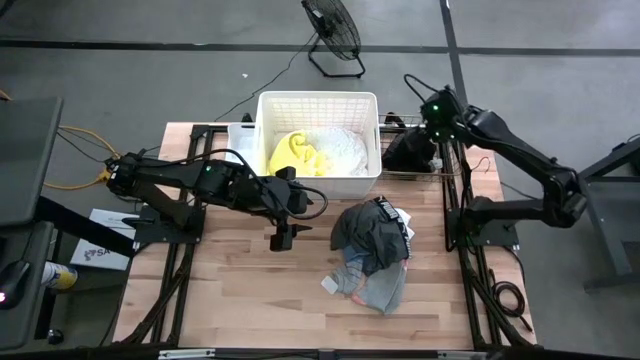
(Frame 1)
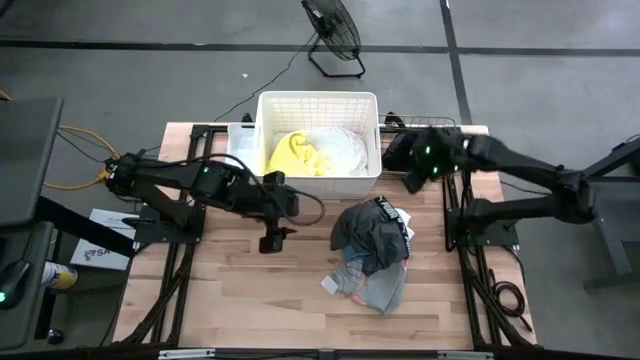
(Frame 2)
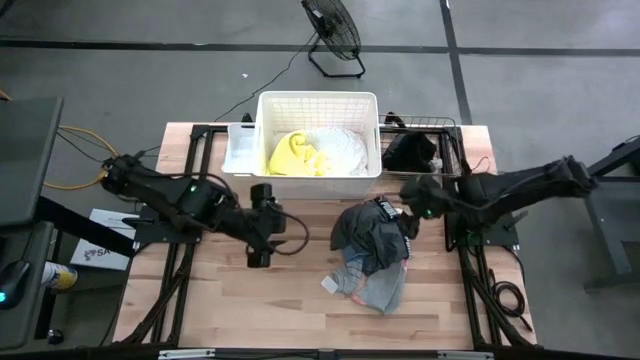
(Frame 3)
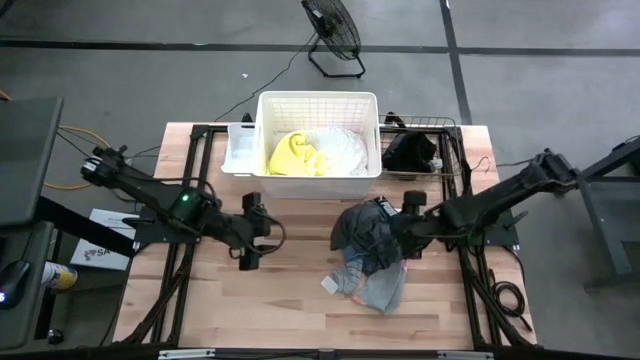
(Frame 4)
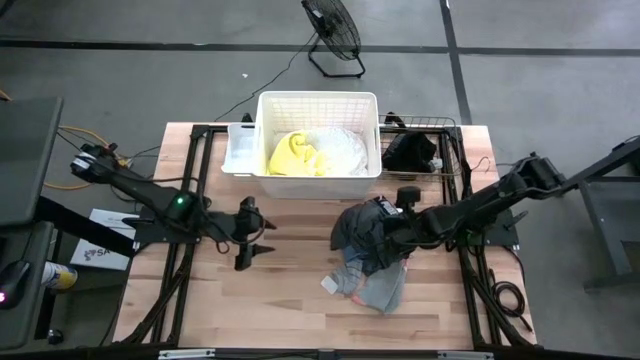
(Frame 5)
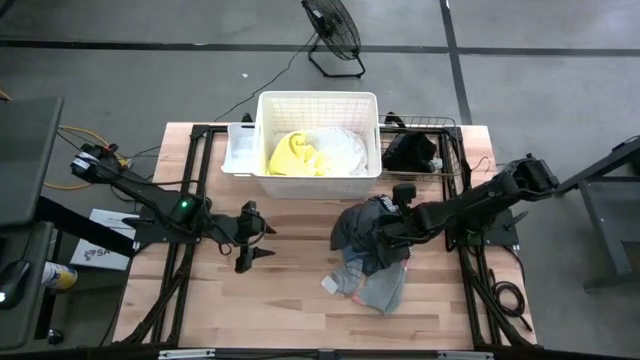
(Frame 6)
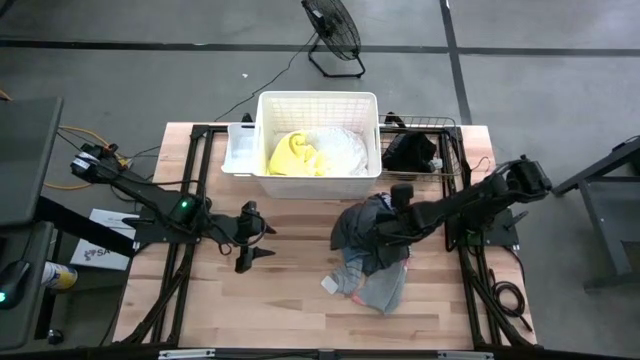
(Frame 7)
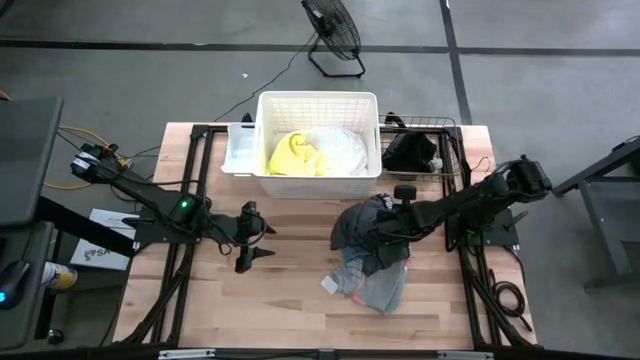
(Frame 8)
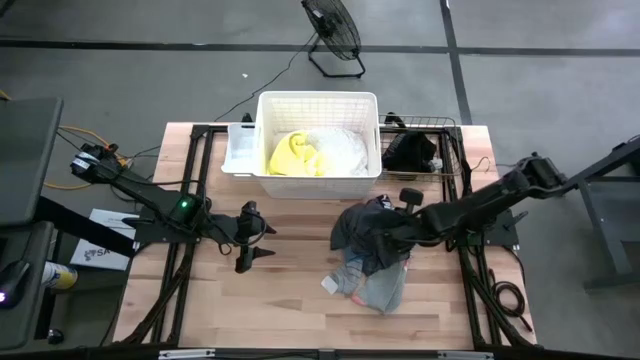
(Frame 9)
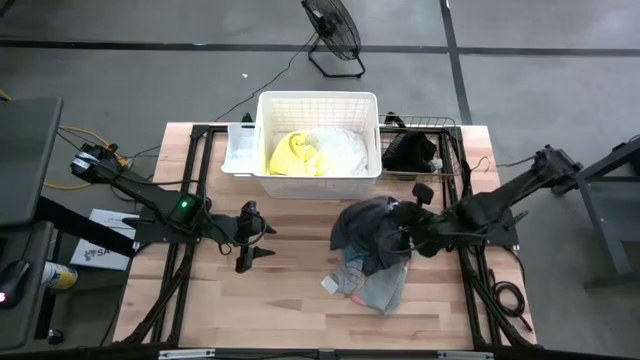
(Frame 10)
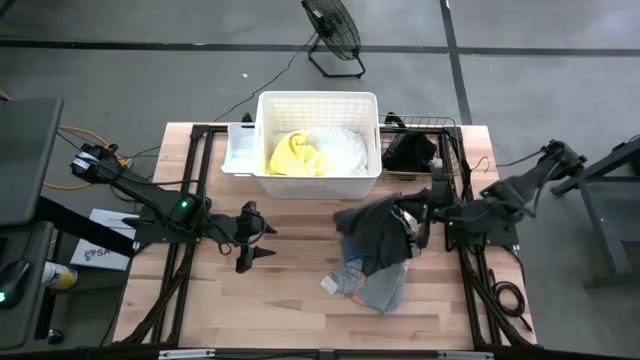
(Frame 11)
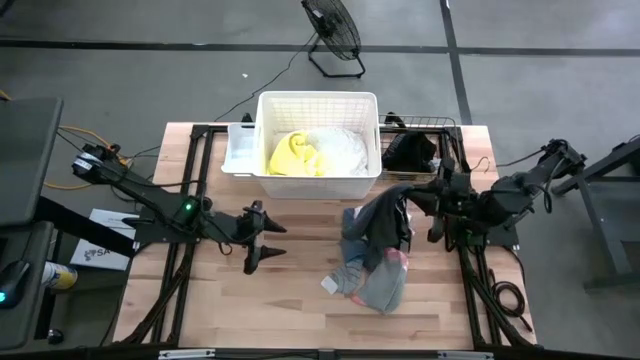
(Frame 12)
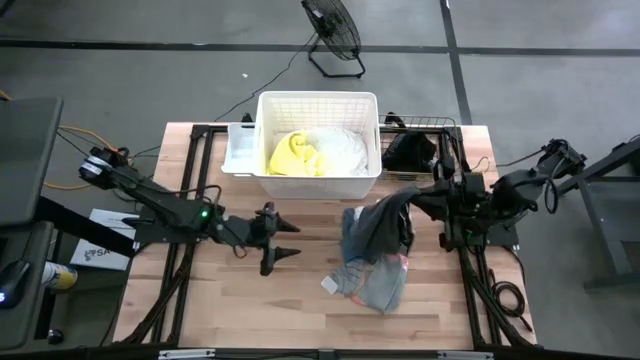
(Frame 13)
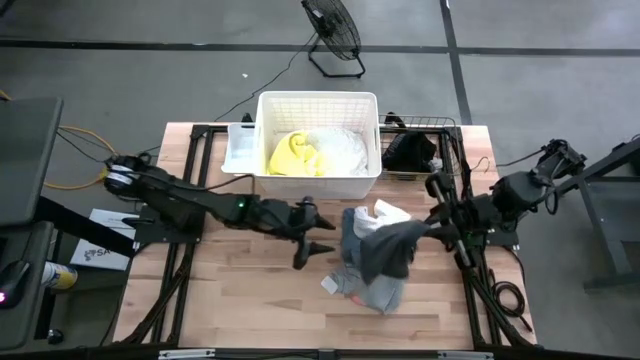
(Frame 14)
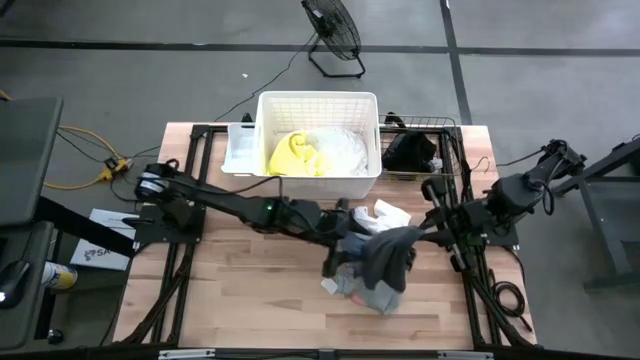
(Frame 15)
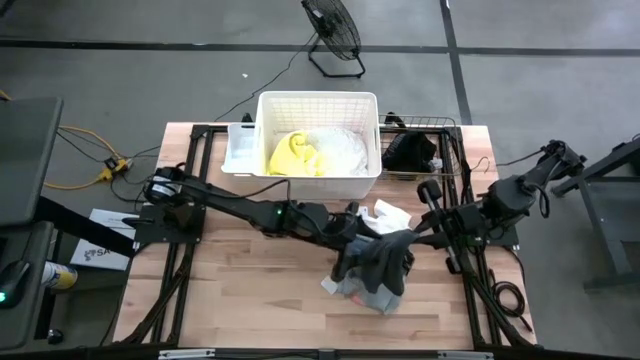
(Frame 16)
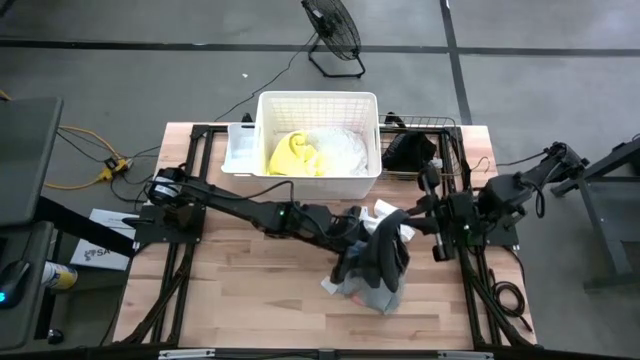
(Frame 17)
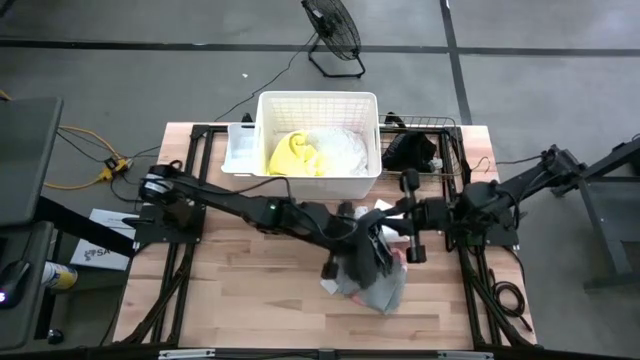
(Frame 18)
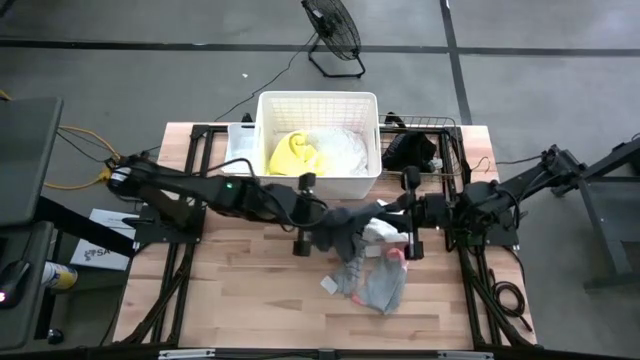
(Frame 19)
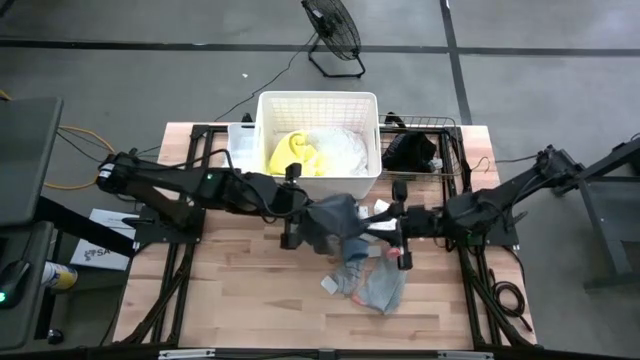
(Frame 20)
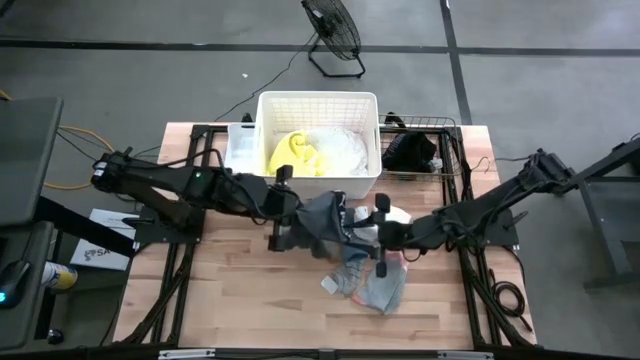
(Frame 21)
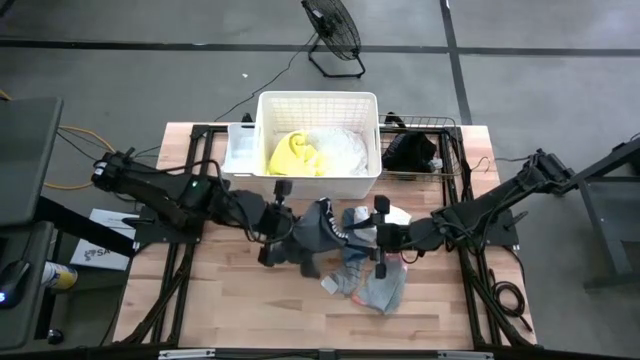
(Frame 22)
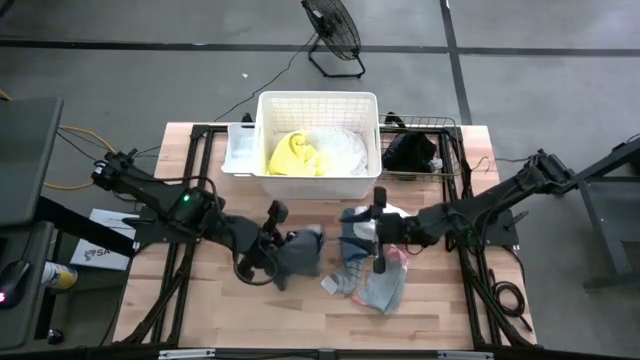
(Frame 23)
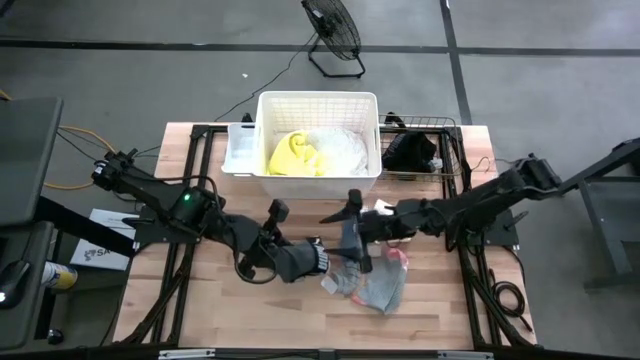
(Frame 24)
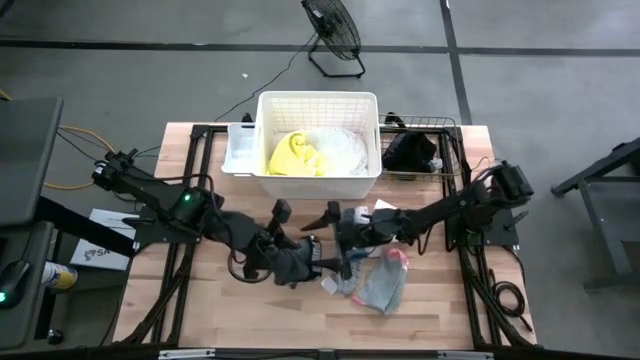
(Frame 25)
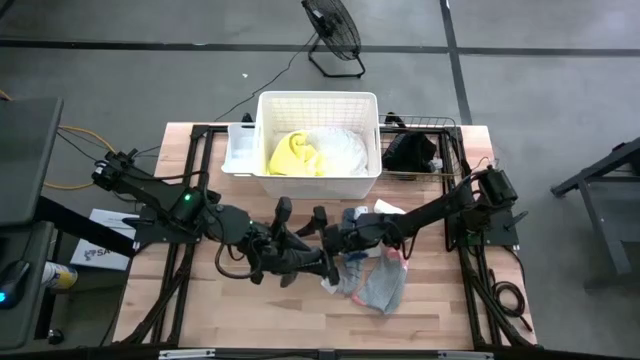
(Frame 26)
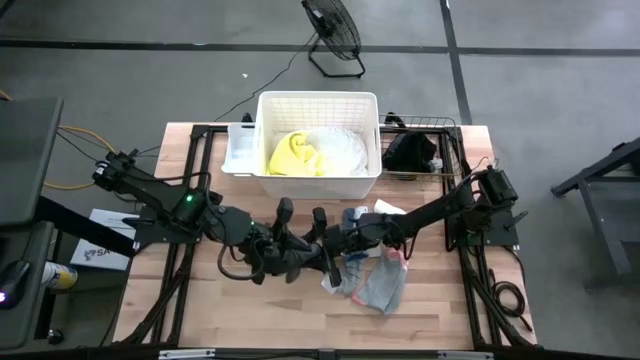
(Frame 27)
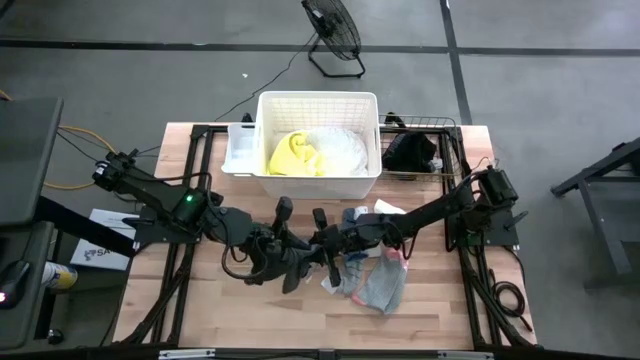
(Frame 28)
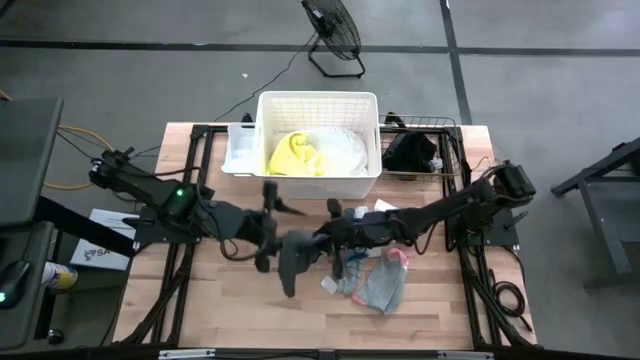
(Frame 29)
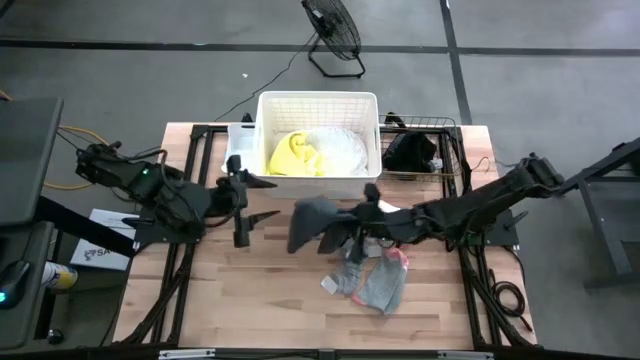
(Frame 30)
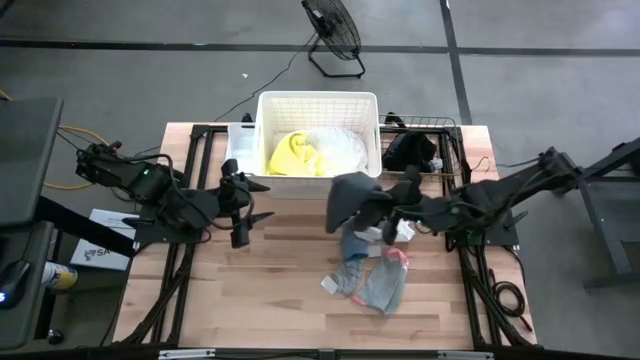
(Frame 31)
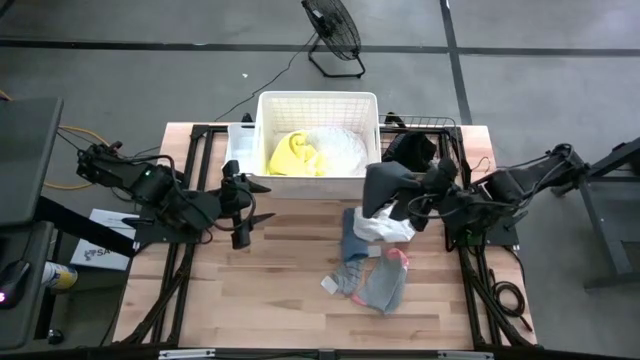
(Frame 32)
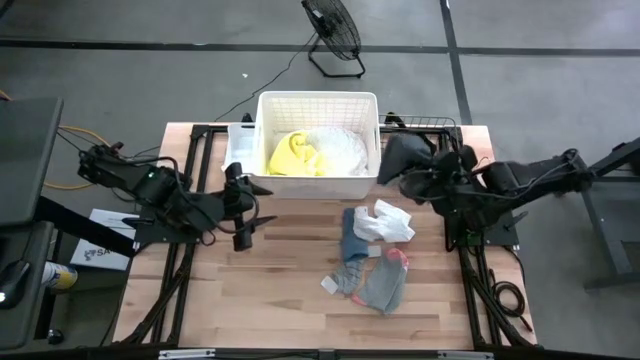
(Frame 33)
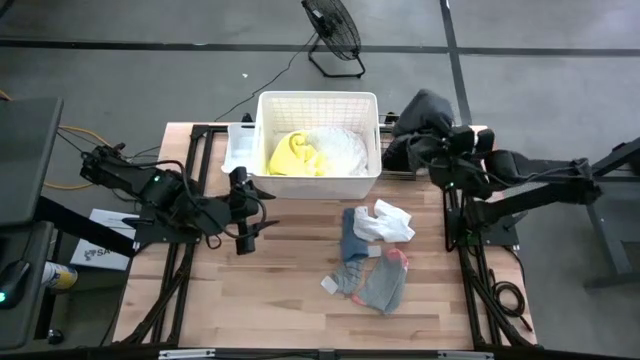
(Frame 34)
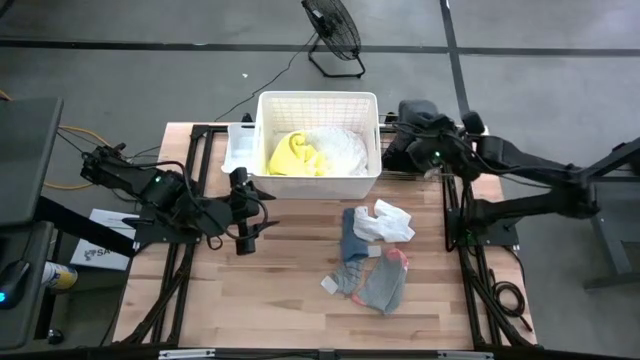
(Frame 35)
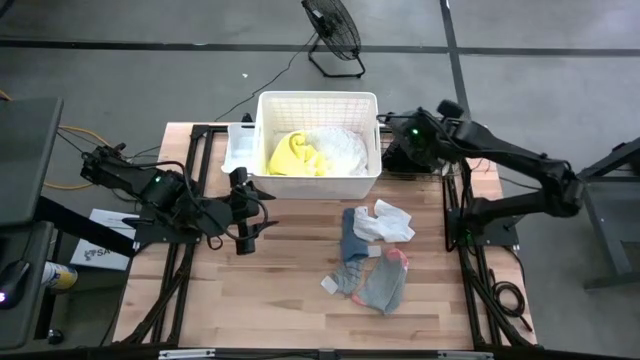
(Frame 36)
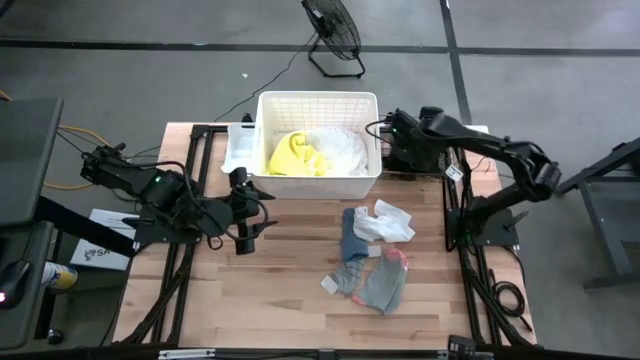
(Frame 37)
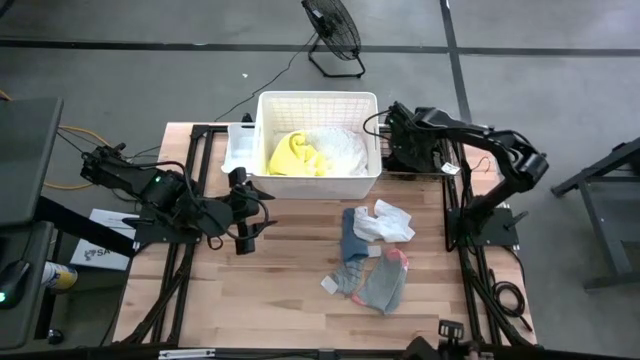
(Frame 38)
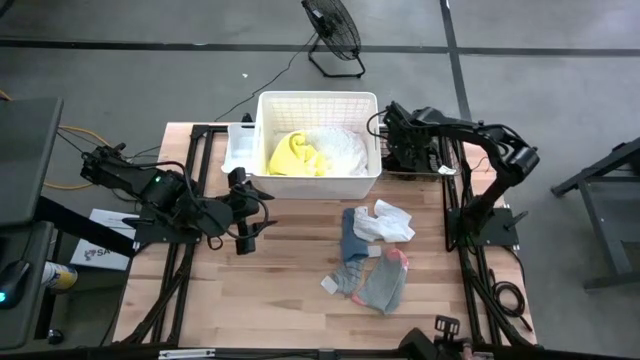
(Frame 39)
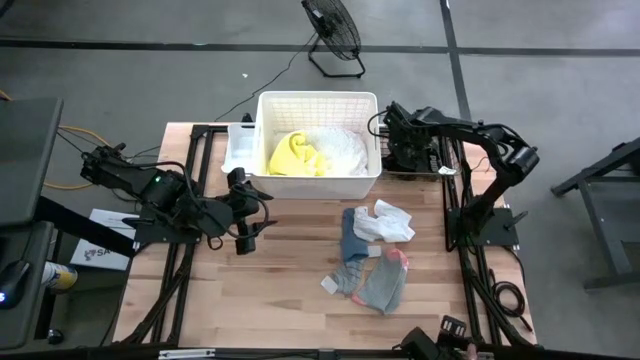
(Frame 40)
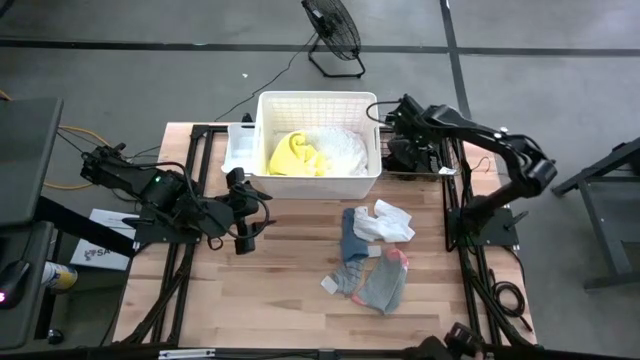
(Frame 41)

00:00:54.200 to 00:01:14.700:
Task: Pick & Place Cloths
Put the gray shorts into the wire basket

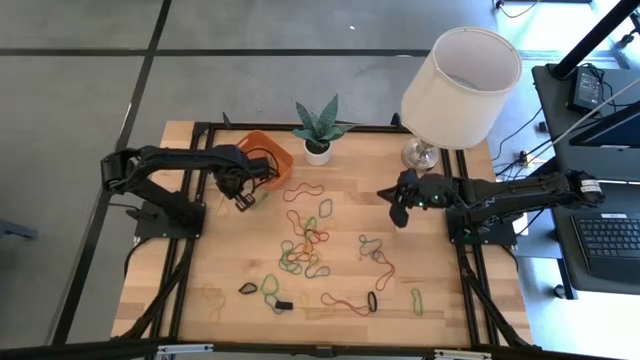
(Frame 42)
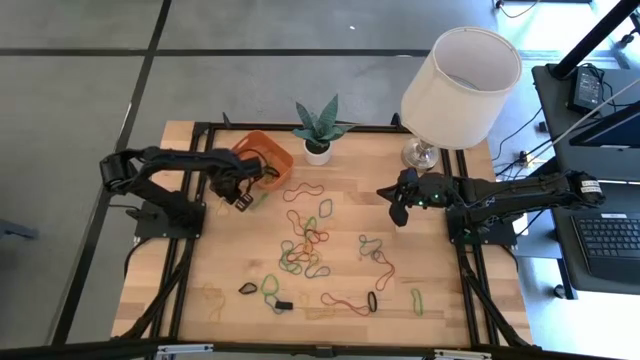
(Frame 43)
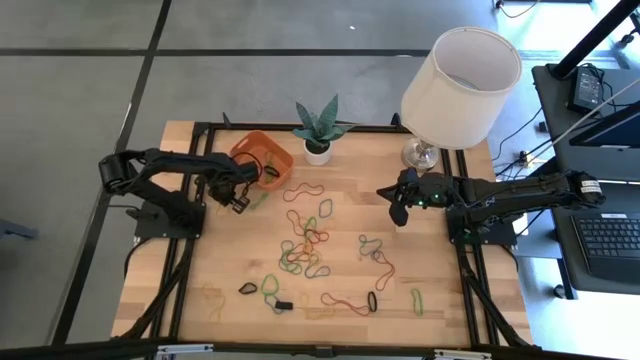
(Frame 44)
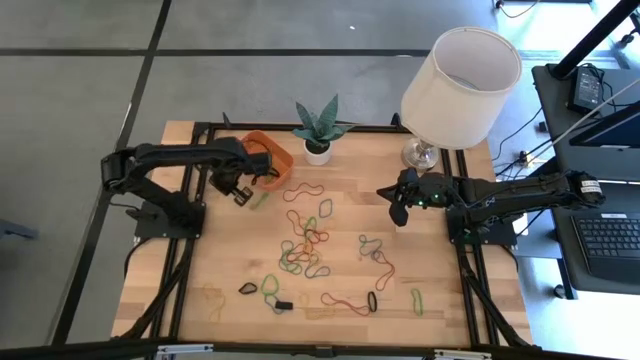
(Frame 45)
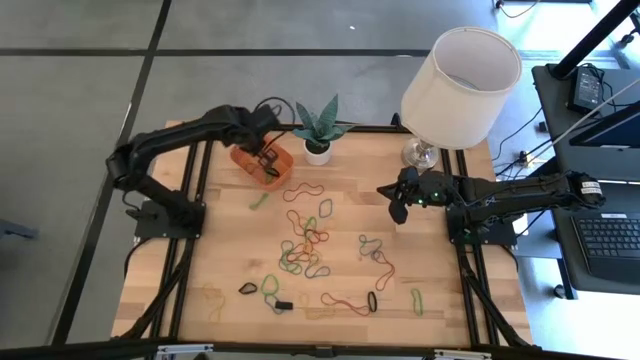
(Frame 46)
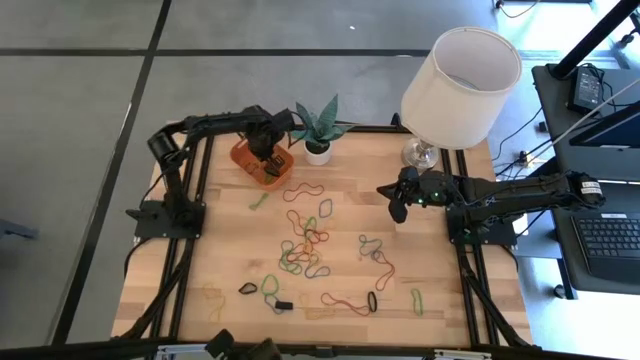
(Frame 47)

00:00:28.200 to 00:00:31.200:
Task: Pick and place rubber bands into bin
Put the yellow rubber band into the orange bin
